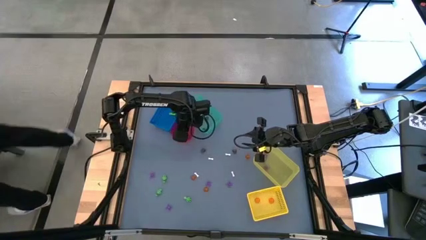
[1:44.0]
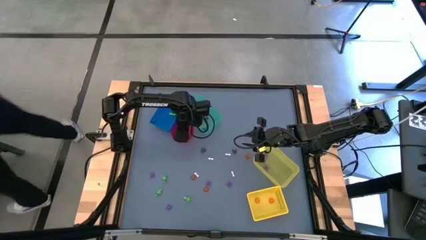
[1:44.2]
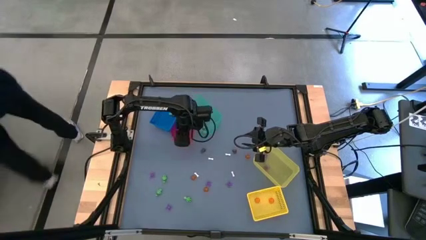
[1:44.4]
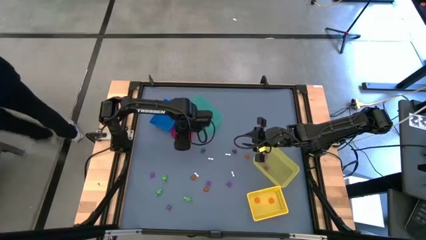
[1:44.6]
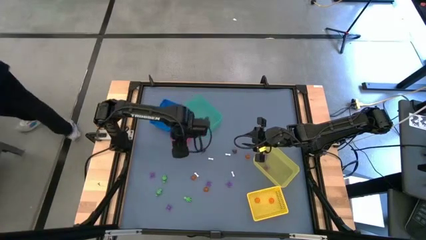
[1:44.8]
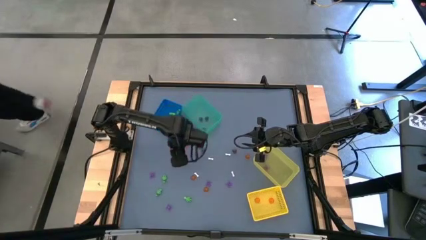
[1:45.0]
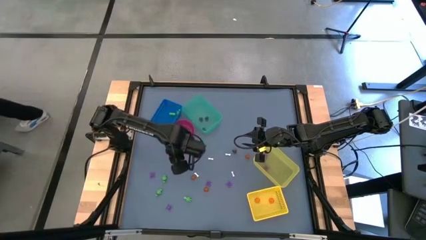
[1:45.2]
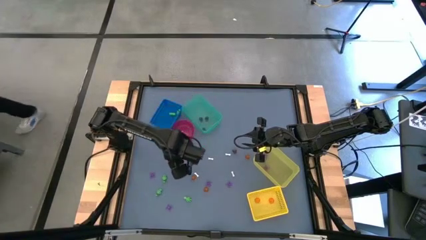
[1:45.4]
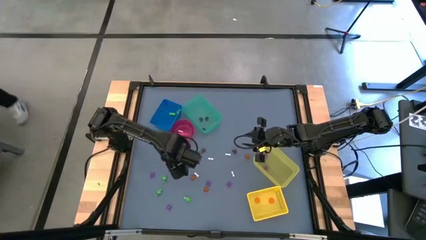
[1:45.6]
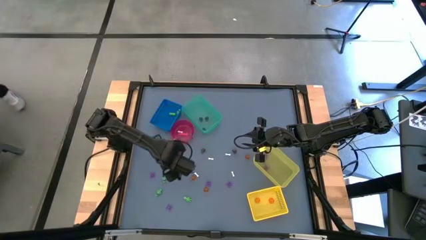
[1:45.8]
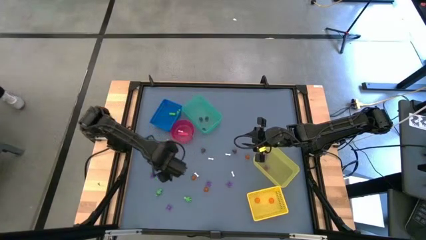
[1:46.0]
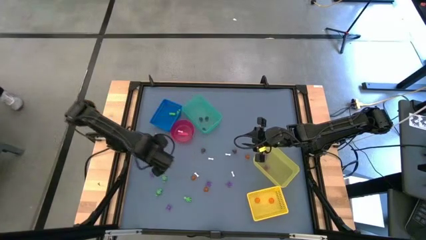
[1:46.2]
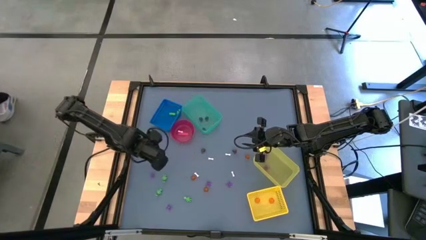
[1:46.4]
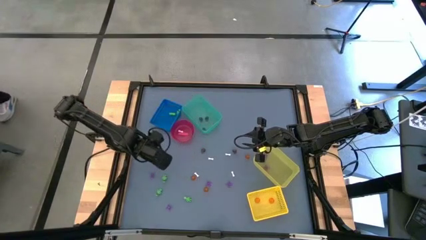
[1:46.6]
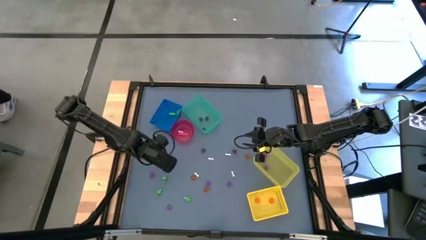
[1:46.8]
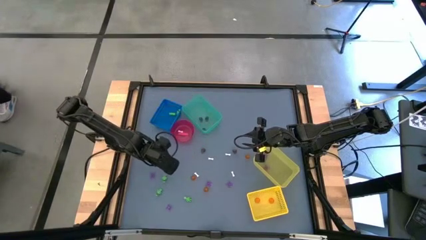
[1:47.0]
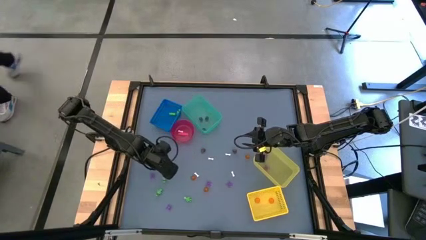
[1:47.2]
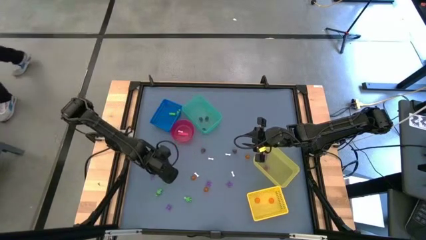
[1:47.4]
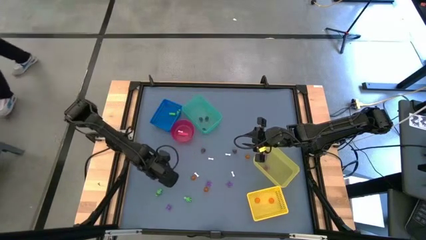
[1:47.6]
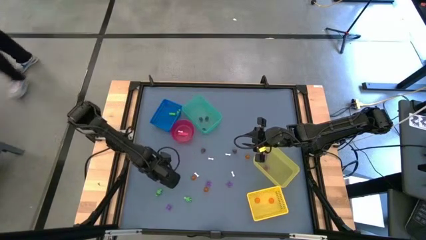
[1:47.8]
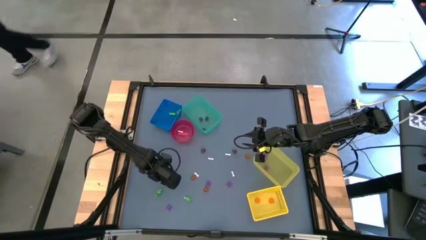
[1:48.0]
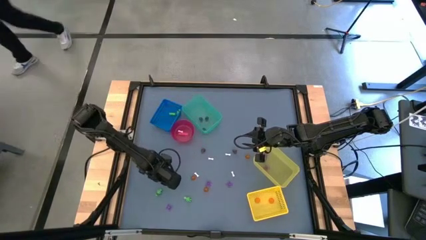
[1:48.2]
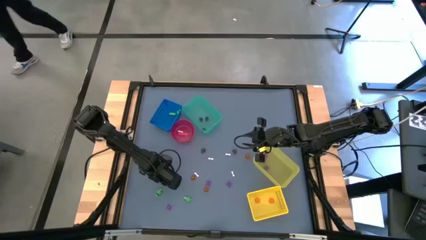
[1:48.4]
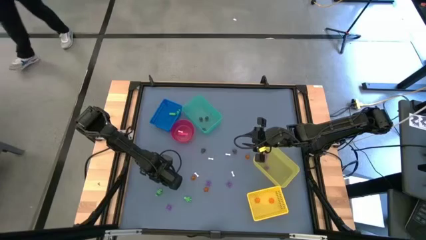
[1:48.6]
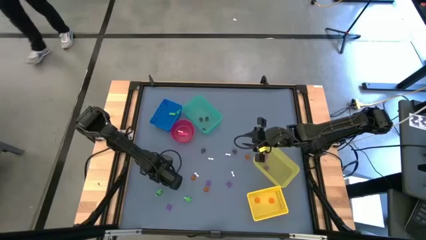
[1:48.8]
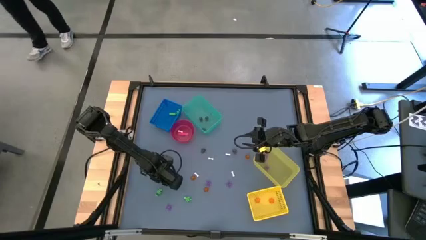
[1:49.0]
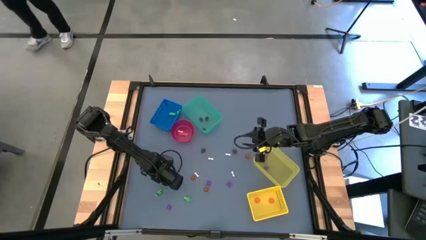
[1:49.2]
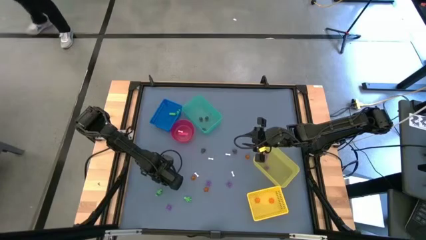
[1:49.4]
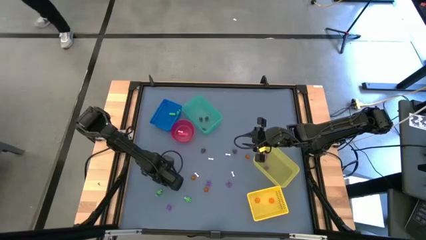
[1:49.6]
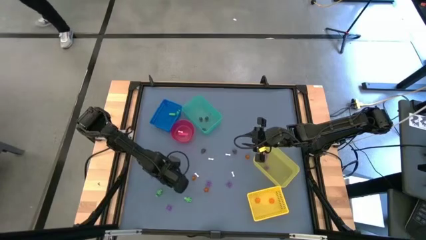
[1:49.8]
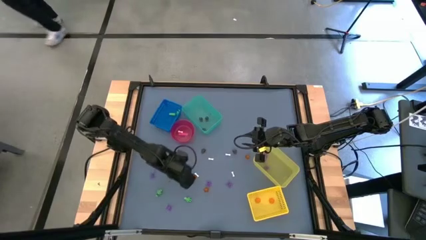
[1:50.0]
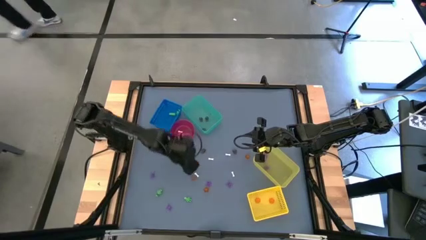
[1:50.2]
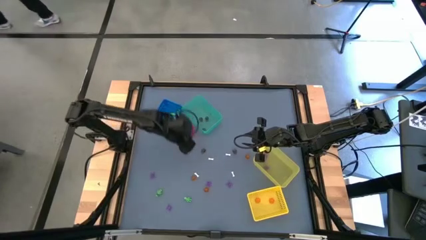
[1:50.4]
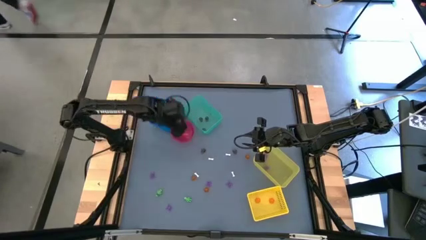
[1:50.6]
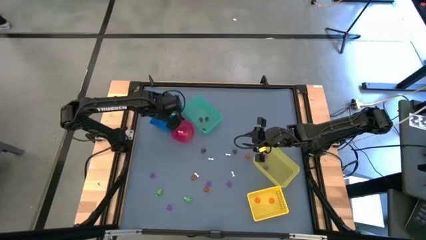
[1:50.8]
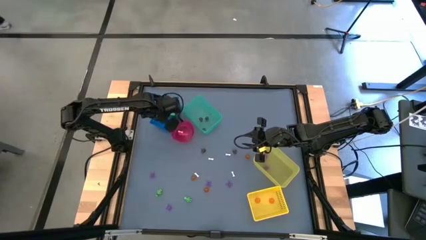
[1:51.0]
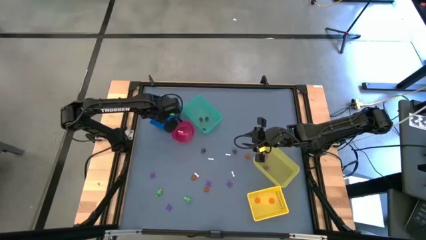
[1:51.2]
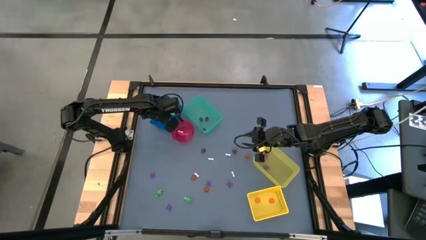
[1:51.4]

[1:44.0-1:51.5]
Task: Sort Halloween decoration
Put the green skeleton toy into the blue bin

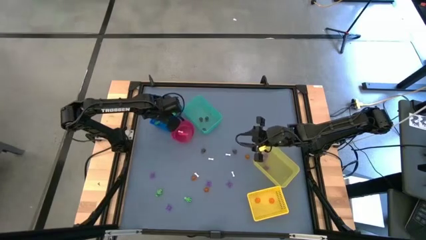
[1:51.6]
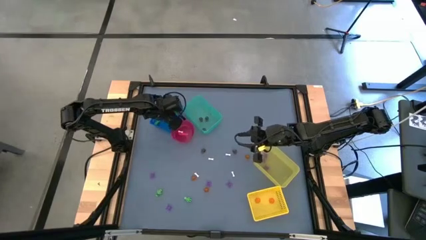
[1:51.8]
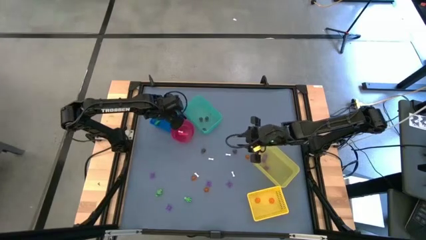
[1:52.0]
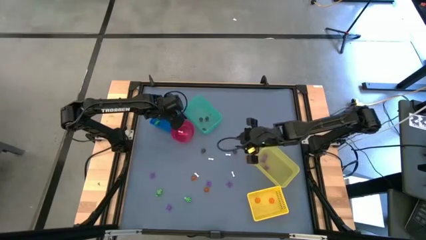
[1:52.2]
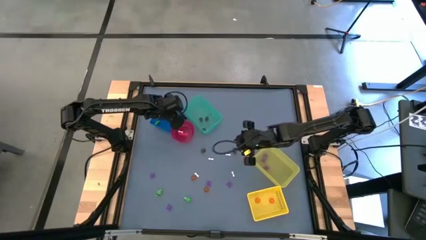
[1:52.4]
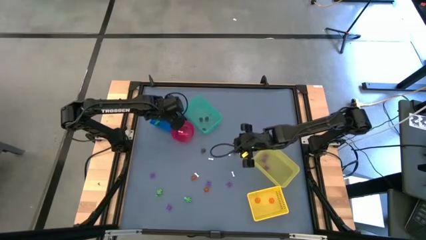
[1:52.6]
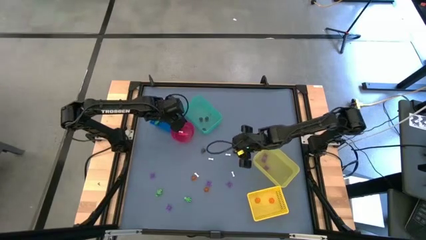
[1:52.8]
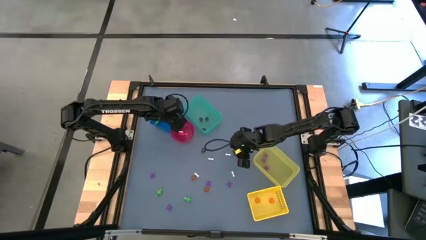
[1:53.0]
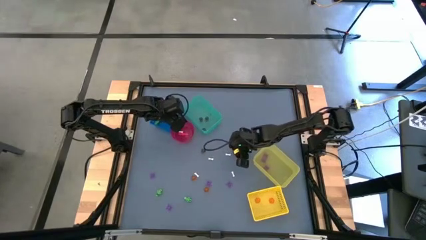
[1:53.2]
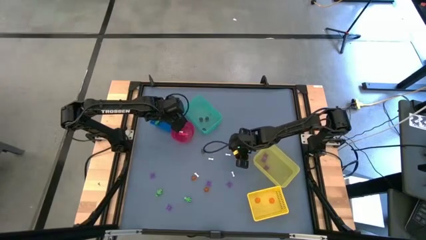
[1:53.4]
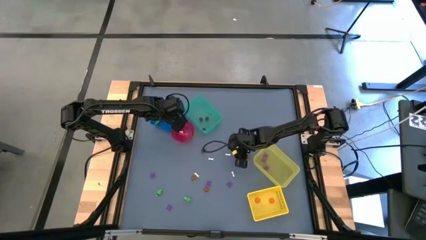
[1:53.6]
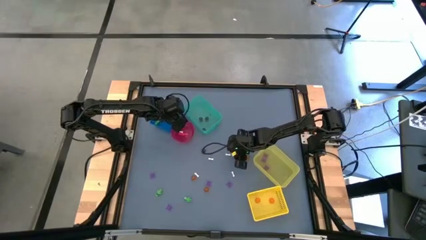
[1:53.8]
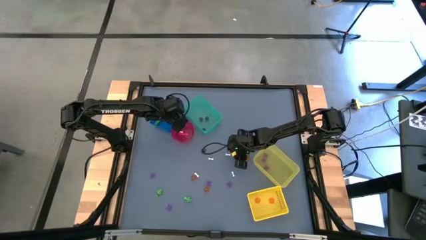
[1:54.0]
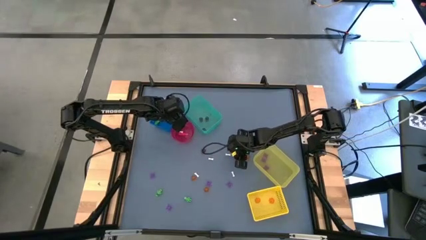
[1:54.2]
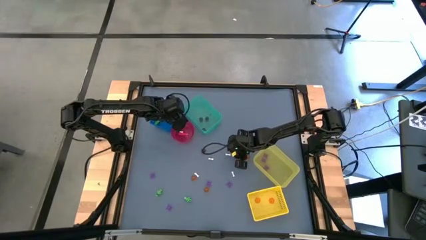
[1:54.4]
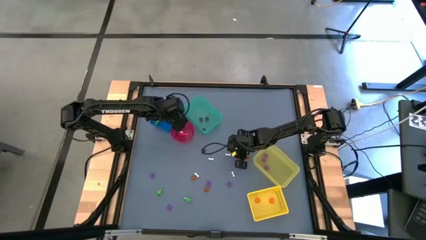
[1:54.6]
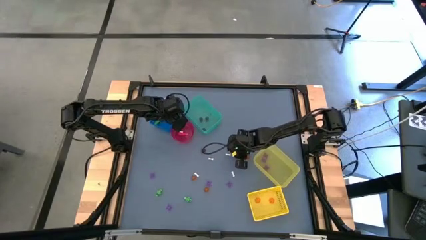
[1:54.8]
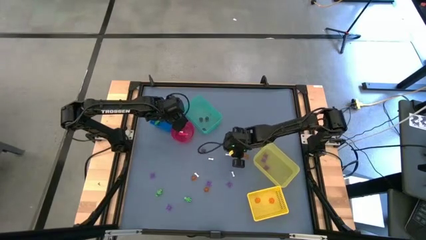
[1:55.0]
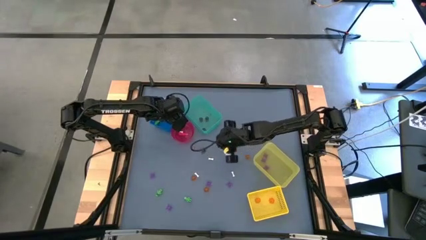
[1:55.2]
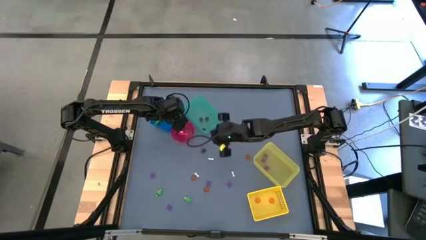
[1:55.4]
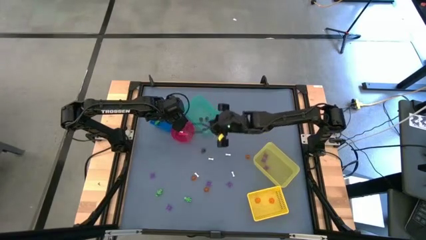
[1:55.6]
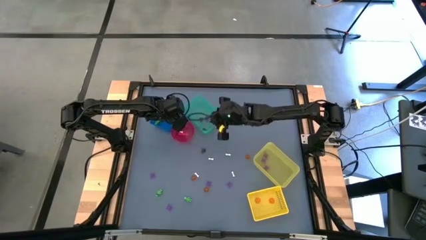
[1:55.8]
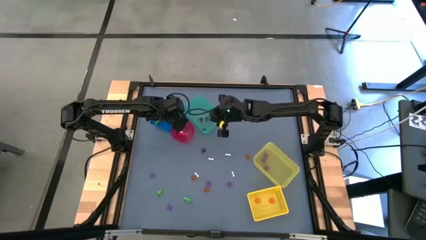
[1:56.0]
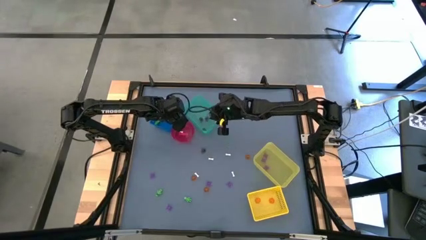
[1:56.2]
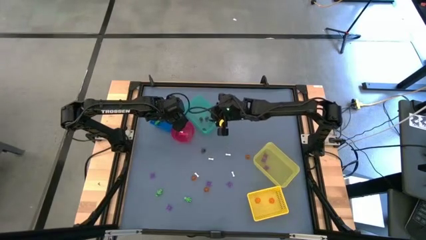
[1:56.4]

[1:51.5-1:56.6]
Put the black skull toy into the green bin

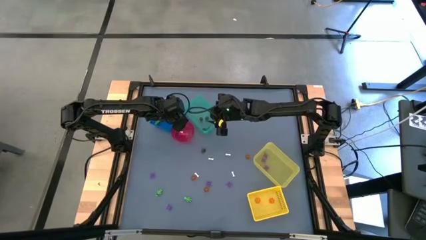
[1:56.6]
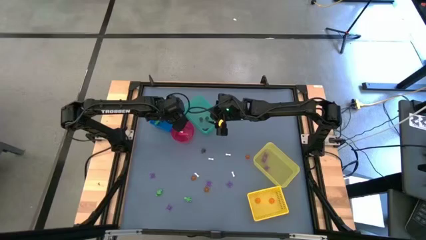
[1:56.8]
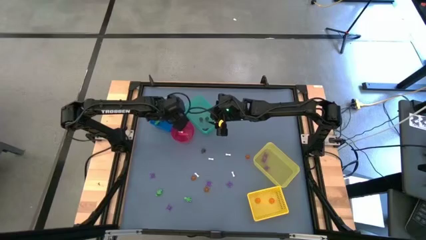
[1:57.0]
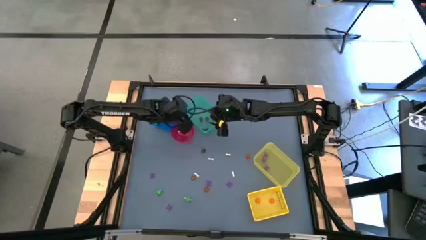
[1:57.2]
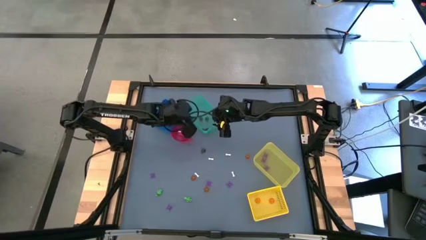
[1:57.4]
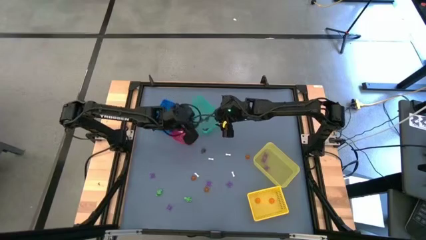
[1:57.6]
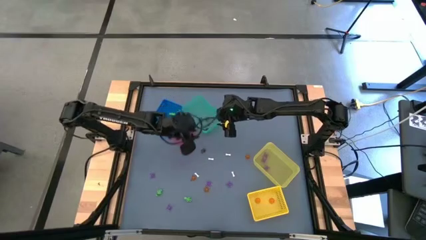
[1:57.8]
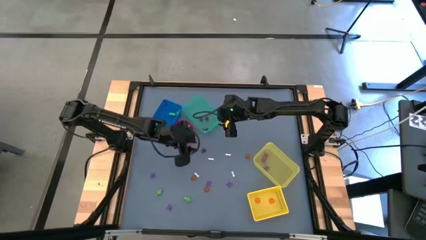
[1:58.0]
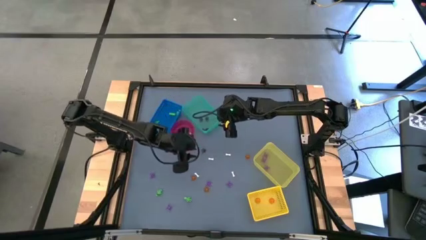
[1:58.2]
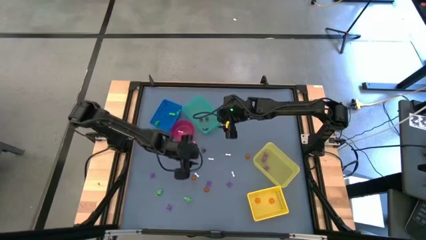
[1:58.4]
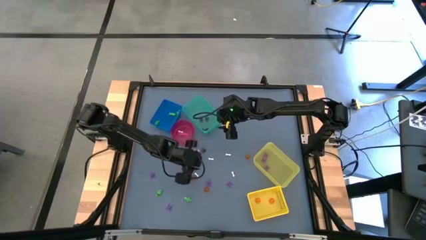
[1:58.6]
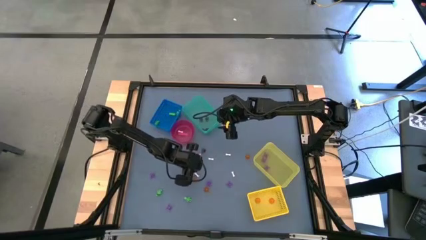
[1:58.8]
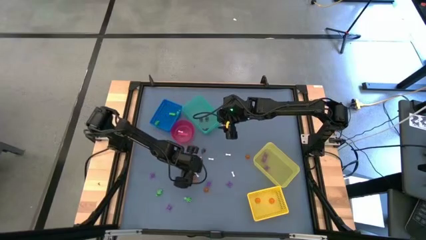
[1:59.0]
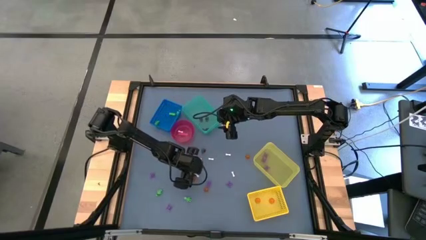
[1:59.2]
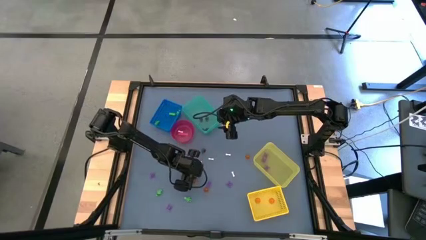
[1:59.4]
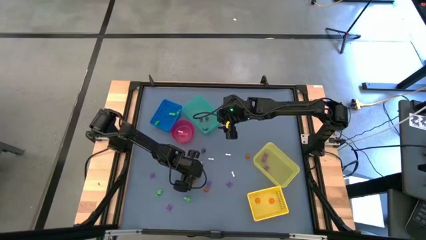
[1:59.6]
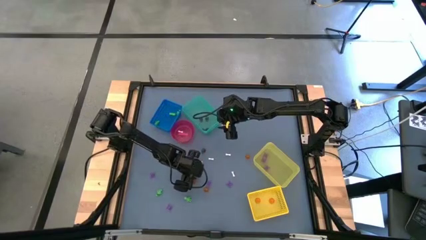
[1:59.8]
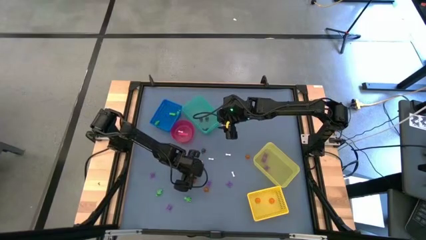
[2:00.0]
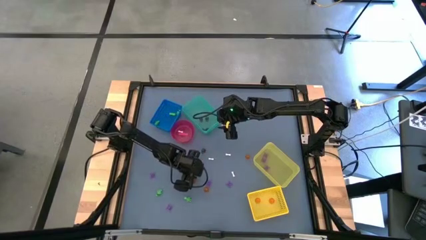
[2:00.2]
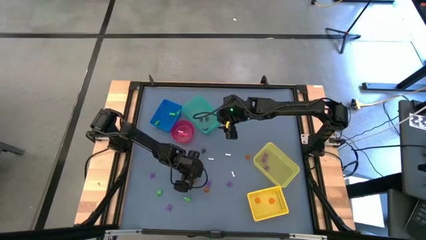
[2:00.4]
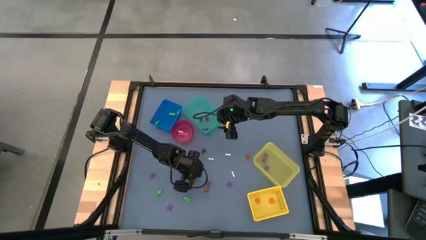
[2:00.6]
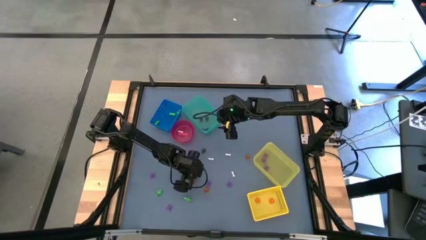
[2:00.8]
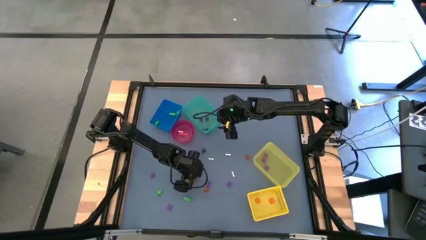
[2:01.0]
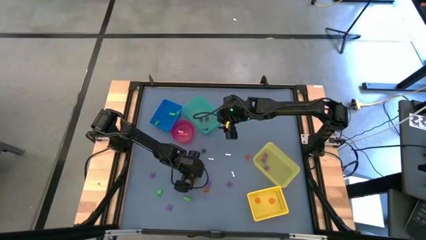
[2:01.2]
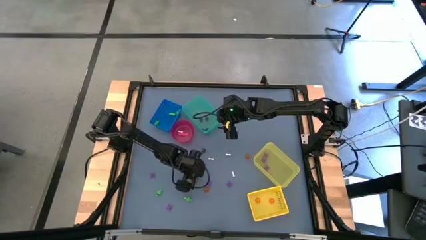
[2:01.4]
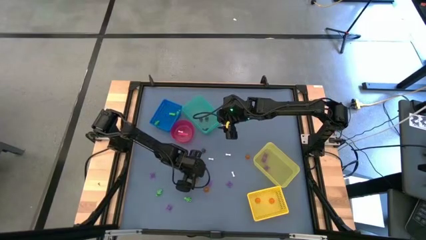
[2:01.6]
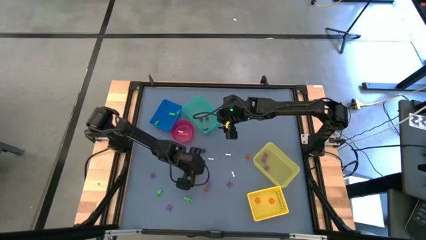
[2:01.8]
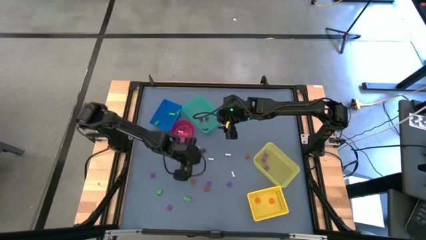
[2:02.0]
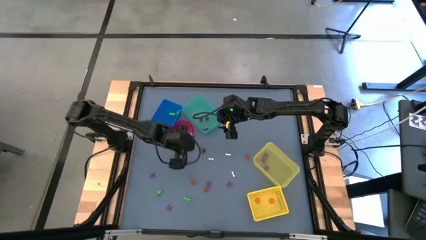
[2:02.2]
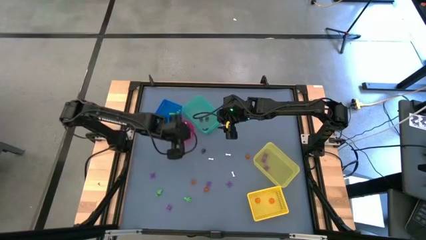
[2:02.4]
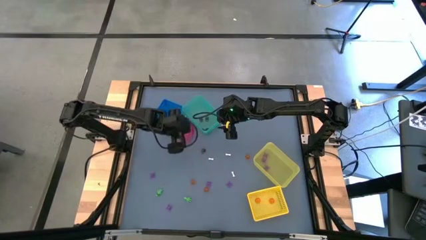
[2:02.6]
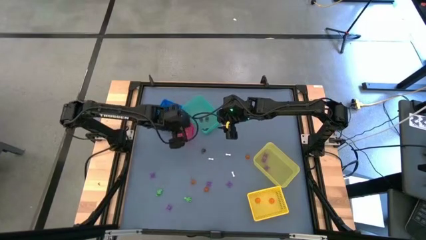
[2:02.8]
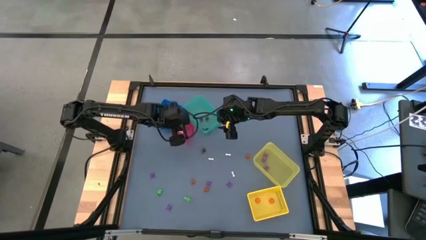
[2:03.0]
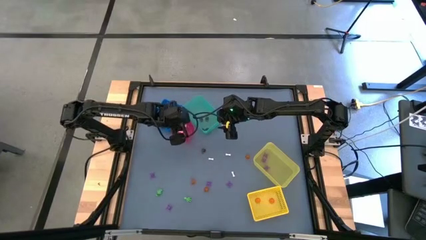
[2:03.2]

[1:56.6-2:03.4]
Put the white bone toy into the red bin
